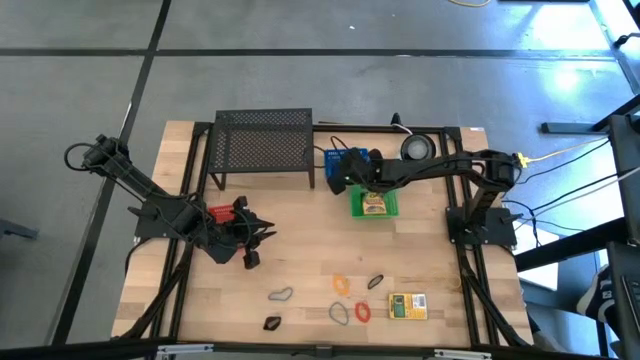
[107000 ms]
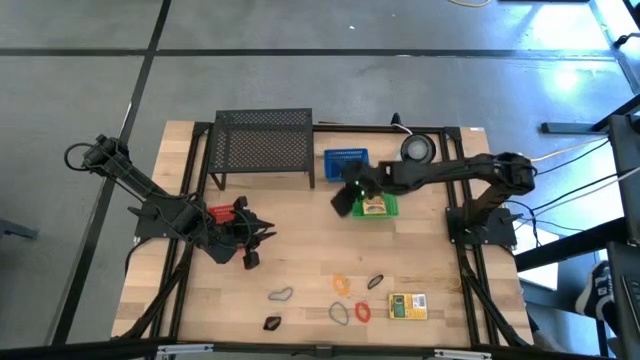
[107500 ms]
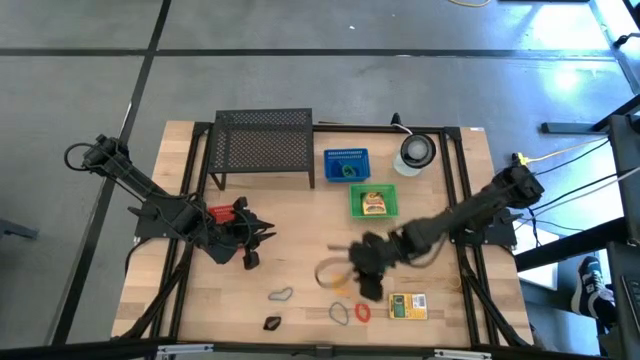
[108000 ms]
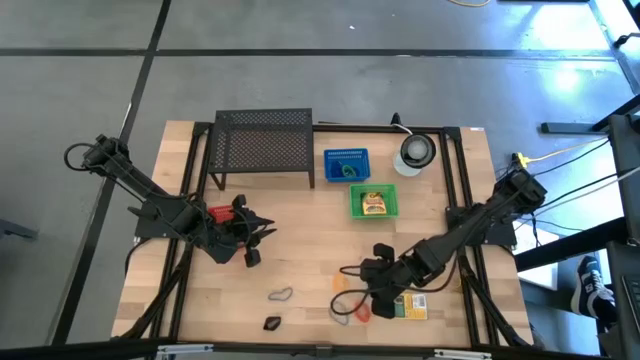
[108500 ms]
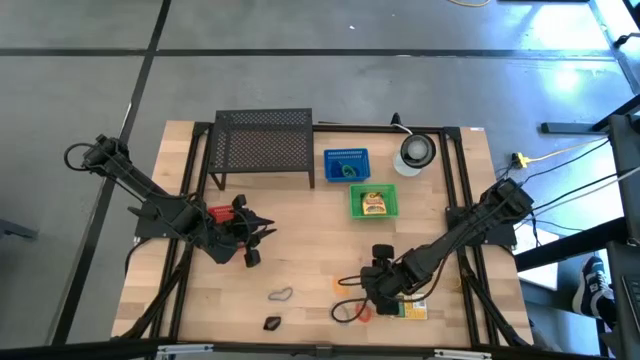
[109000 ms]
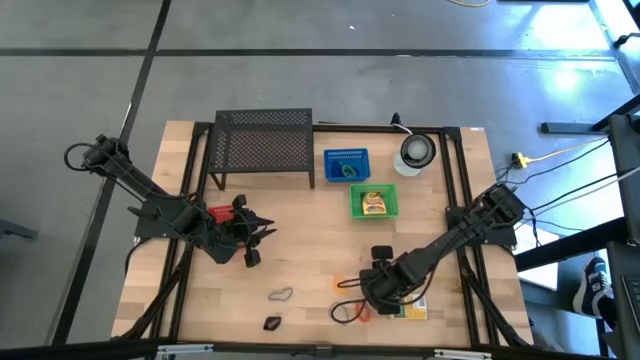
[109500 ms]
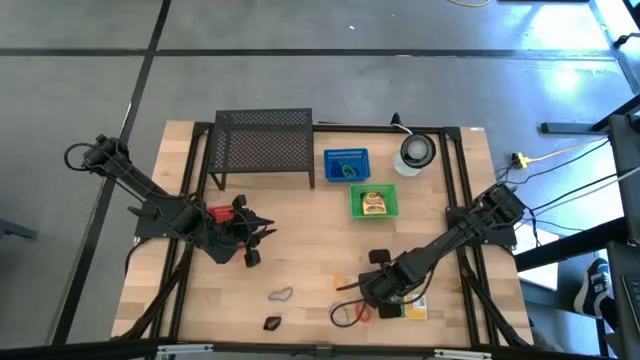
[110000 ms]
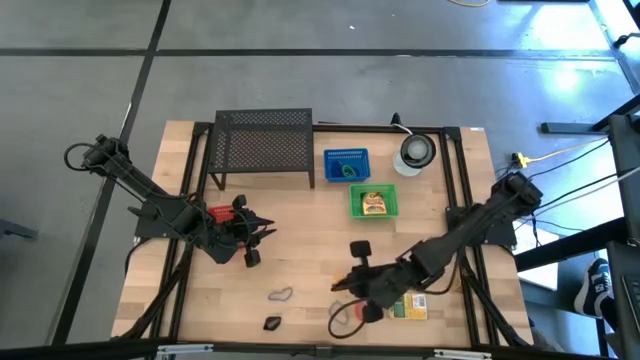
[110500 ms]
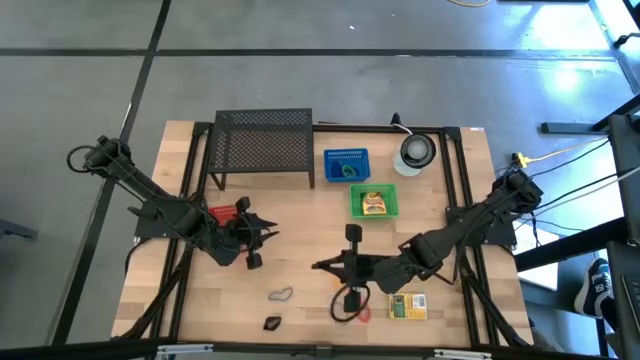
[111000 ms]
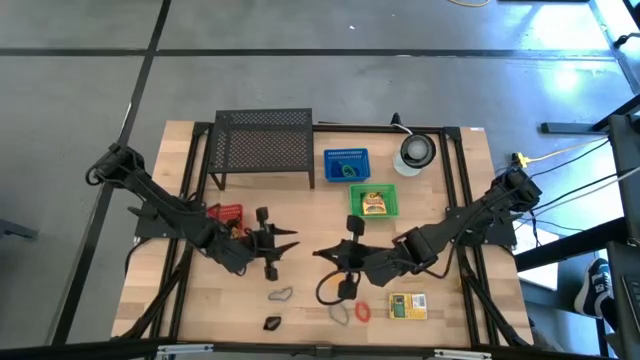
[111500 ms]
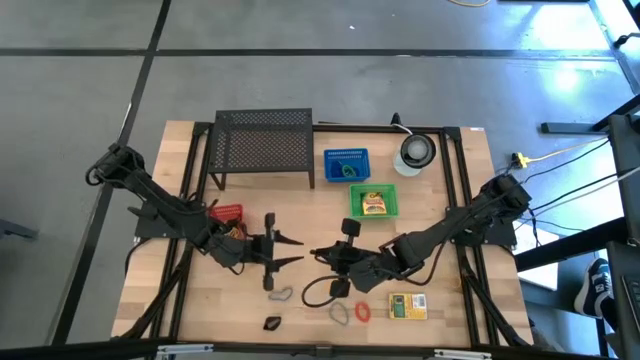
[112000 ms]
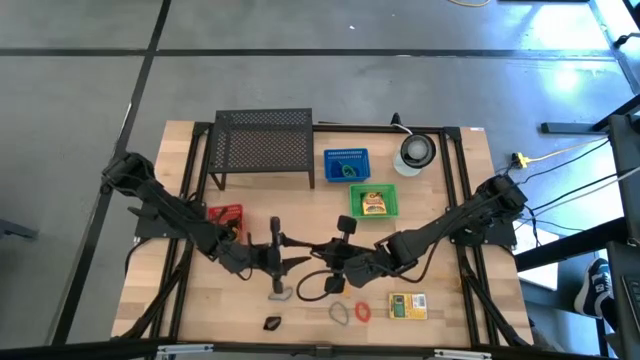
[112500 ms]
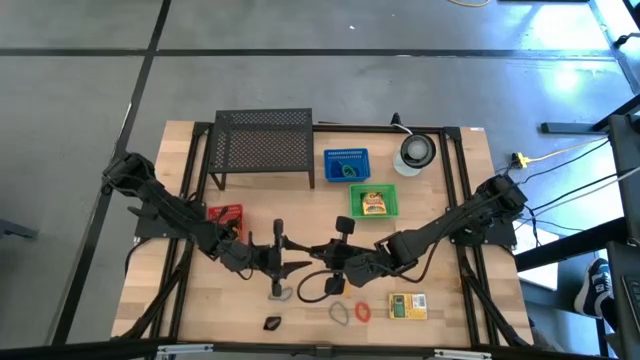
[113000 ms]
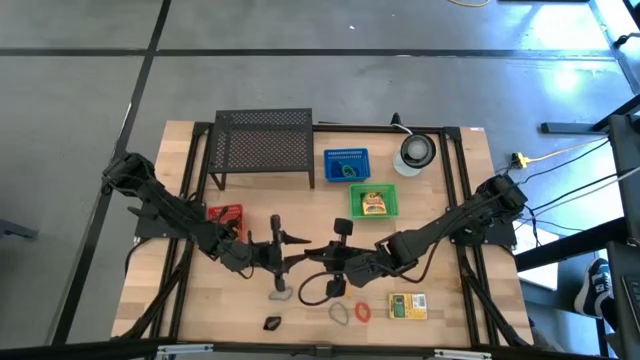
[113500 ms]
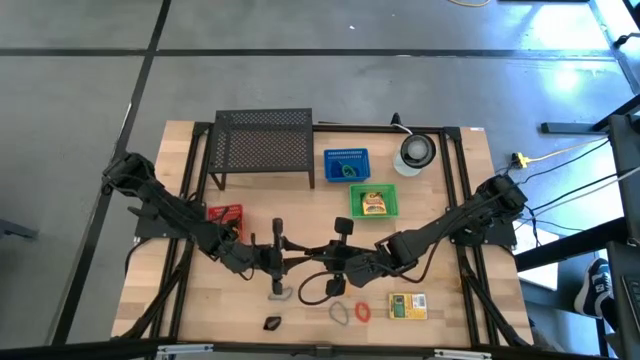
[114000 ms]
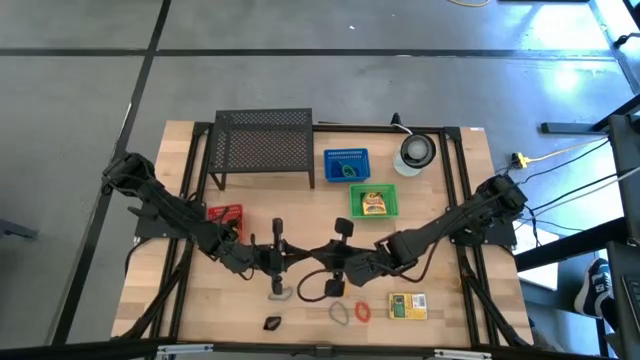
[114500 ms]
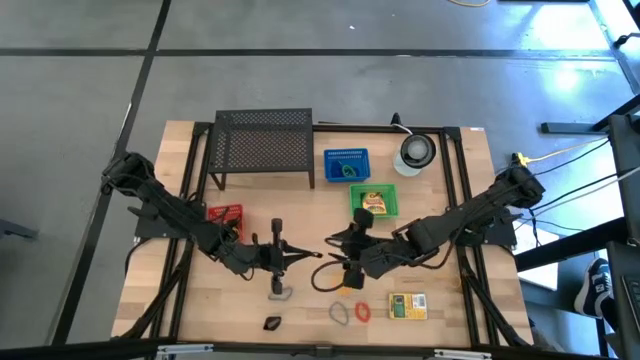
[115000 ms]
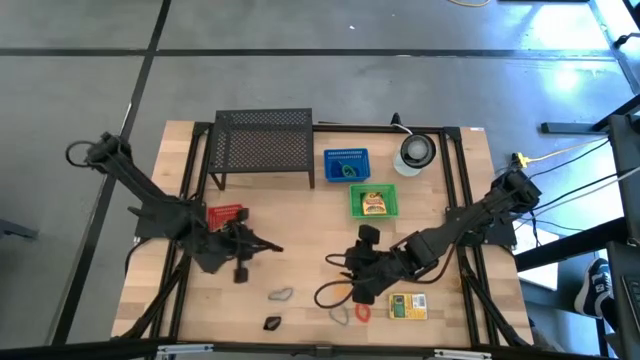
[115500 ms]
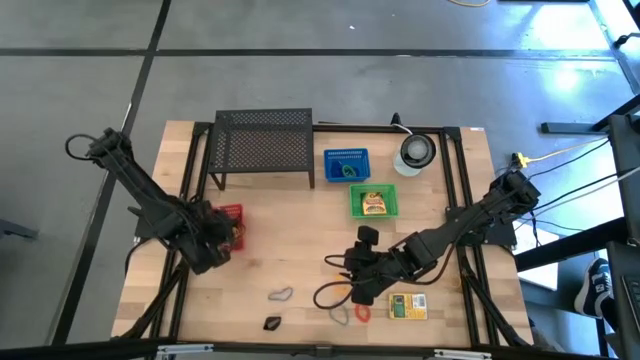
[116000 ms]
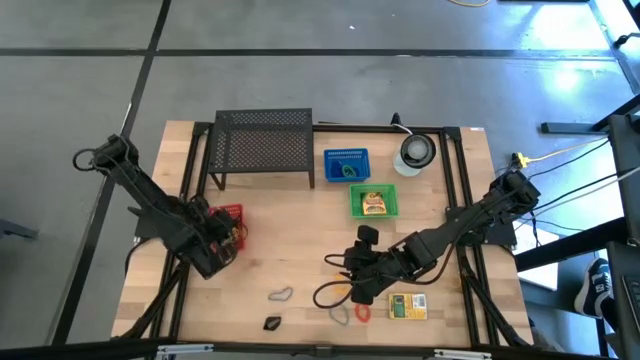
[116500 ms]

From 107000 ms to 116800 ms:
Task: Pick & Place Office Desk Supplies
Put the black rubber band into the orange basket

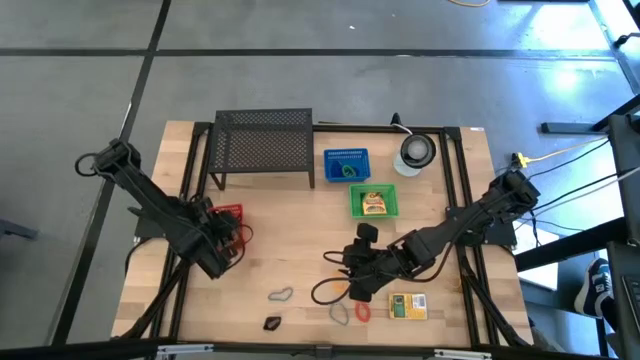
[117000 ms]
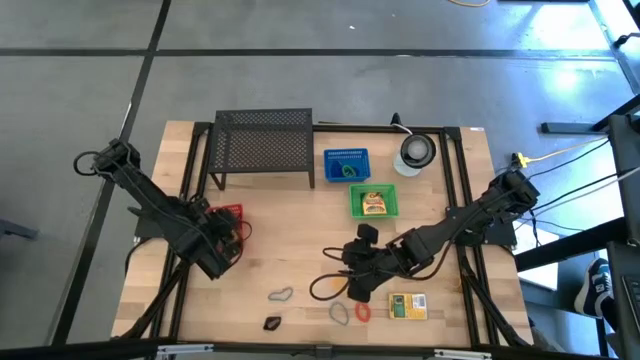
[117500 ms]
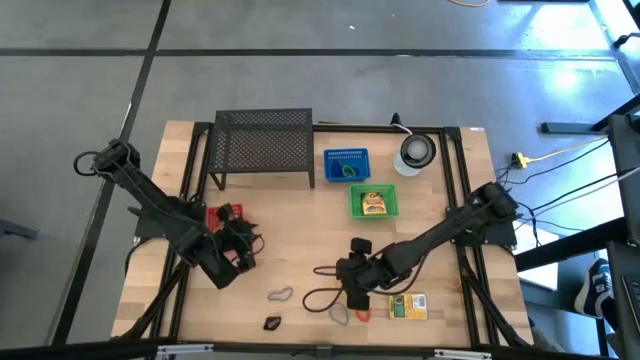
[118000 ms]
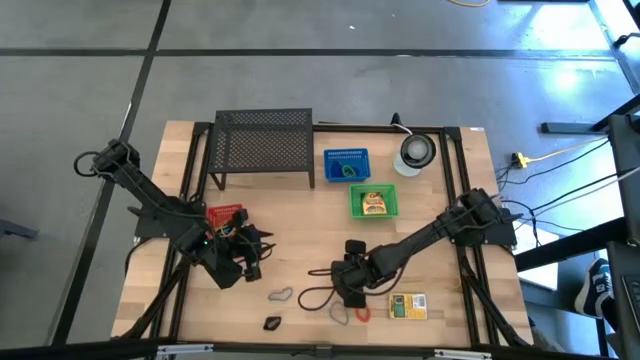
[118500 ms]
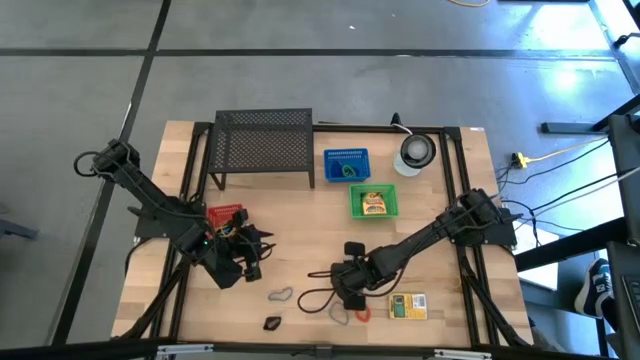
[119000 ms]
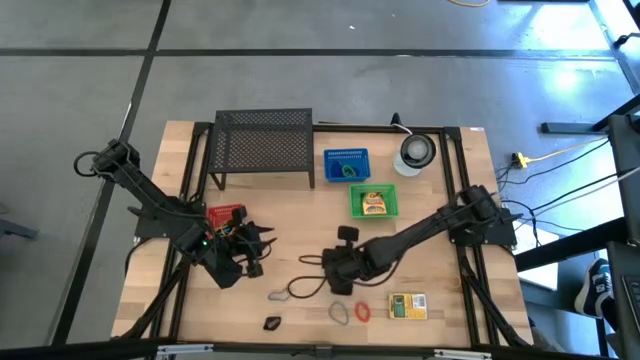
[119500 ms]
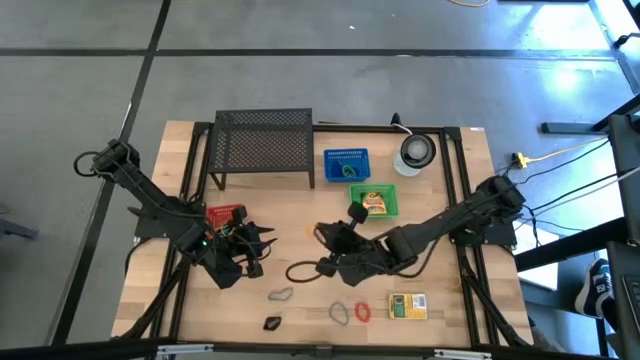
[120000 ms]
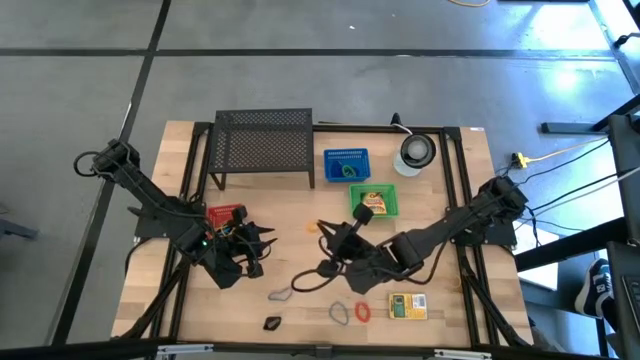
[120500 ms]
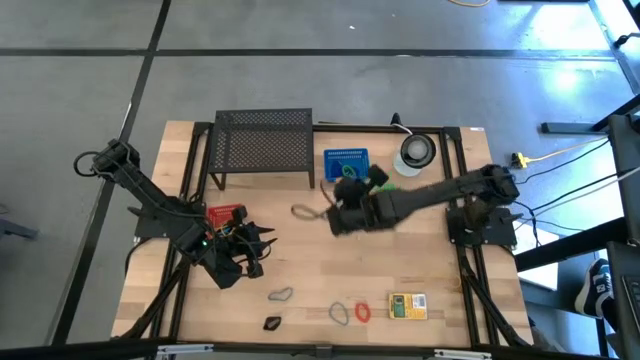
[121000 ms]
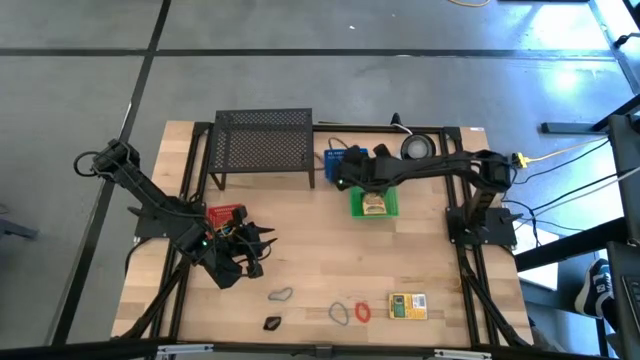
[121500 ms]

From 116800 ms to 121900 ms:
Put the yellow spring keychain into the blue basket

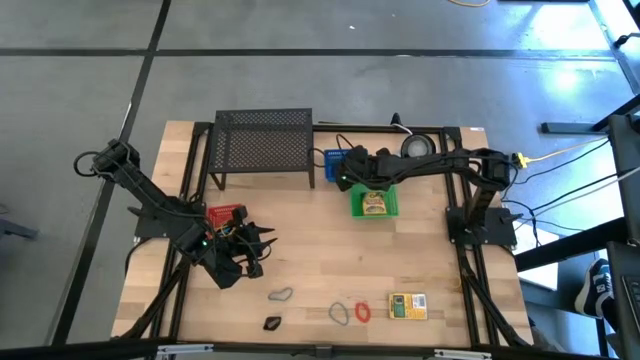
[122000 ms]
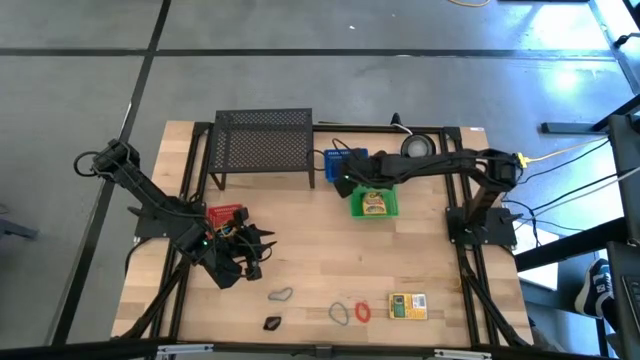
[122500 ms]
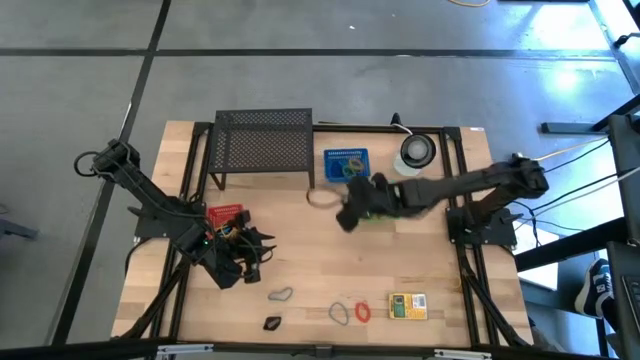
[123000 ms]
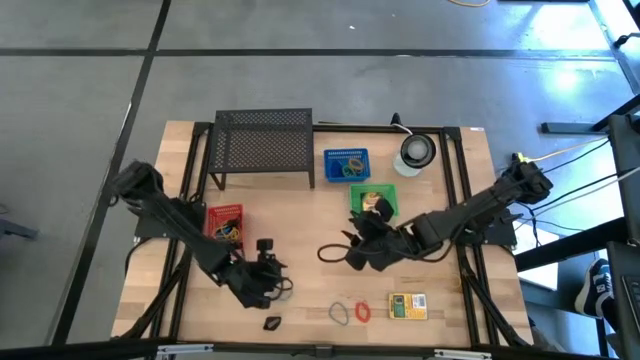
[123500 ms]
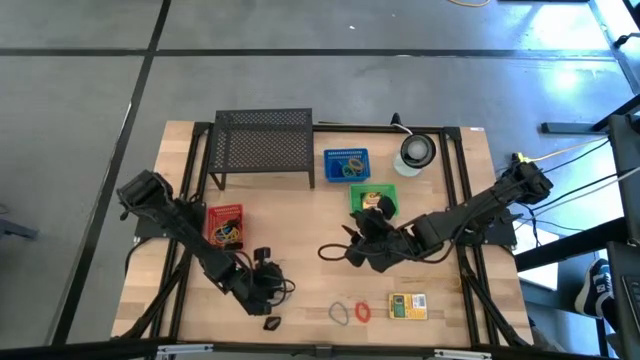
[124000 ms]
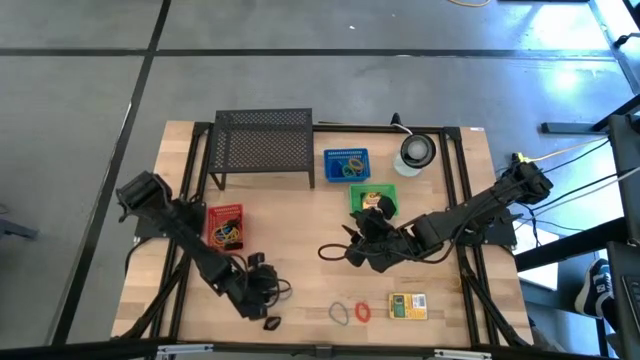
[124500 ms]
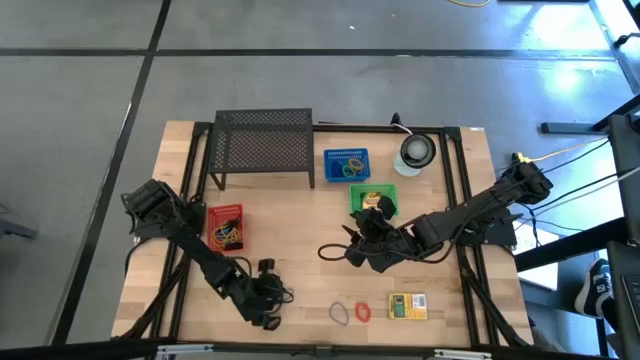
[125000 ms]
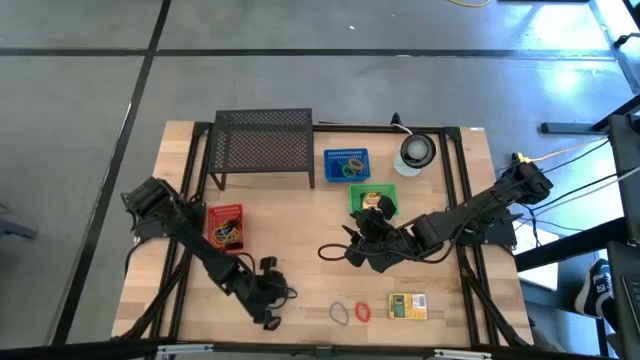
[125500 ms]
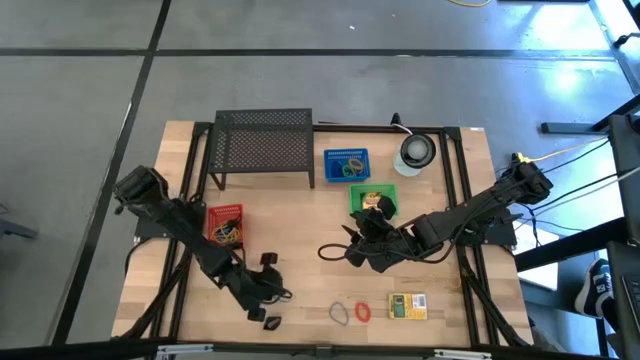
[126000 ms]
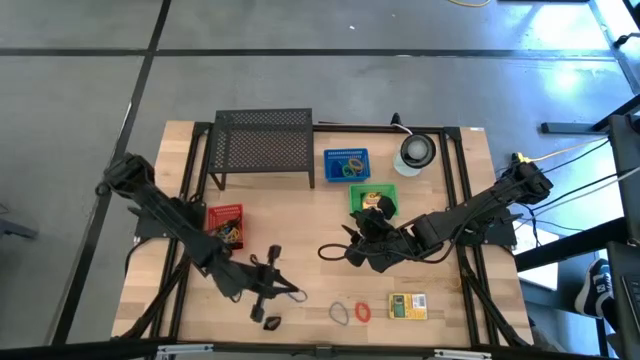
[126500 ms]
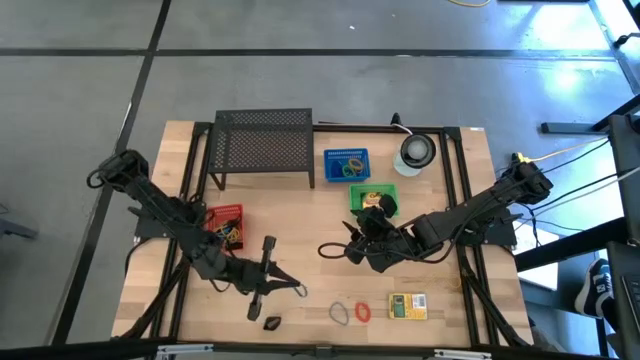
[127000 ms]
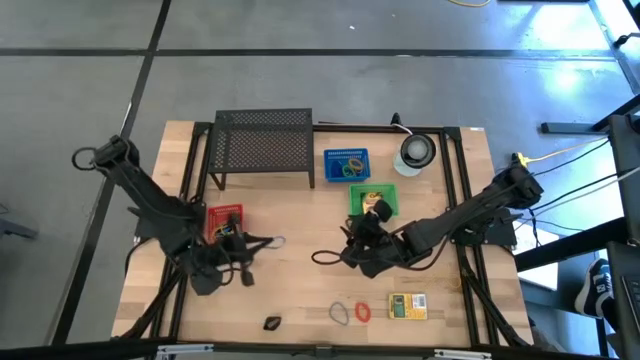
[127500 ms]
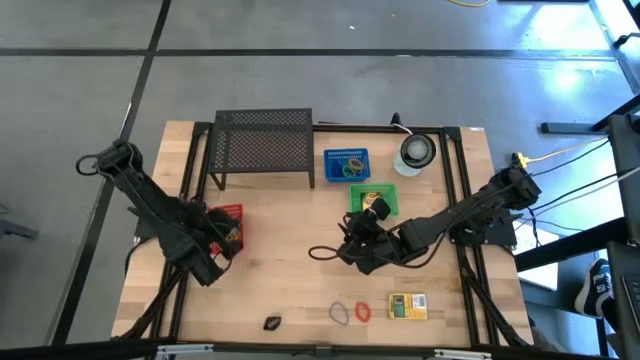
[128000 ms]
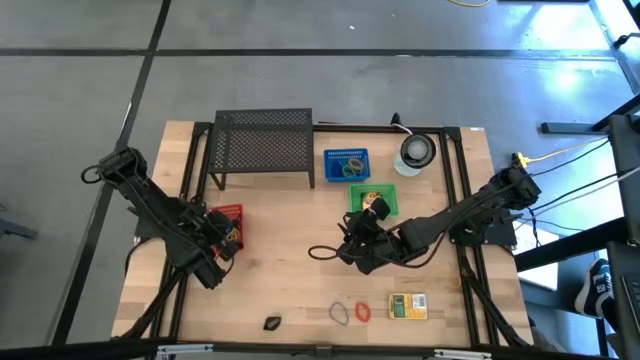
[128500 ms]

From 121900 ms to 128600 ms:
Put the blue rubber band into the orange basket
